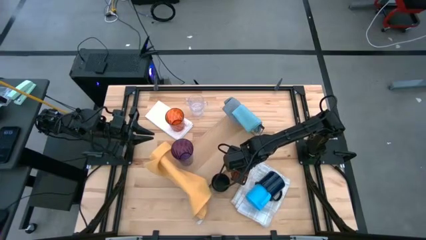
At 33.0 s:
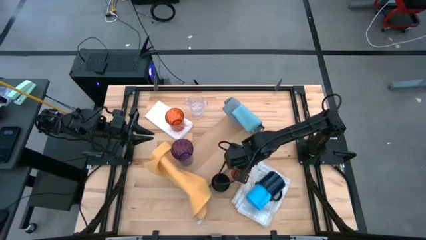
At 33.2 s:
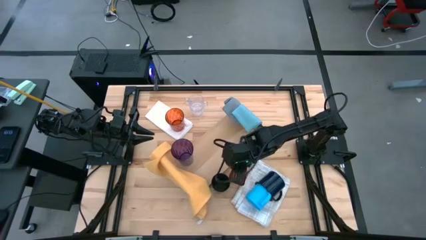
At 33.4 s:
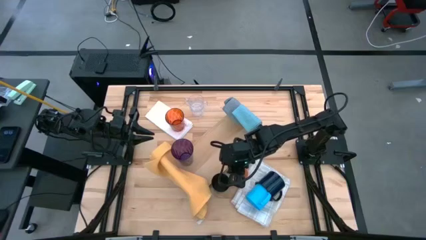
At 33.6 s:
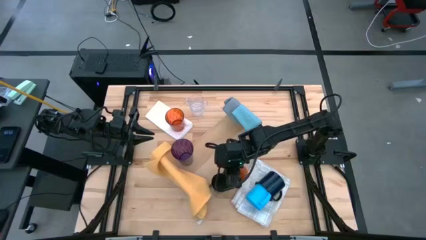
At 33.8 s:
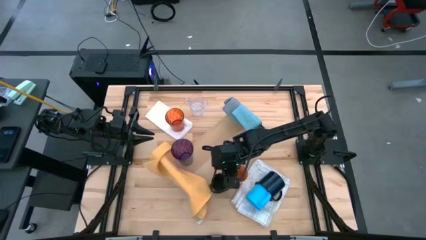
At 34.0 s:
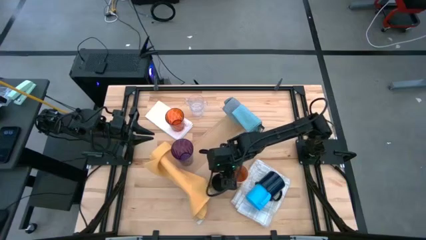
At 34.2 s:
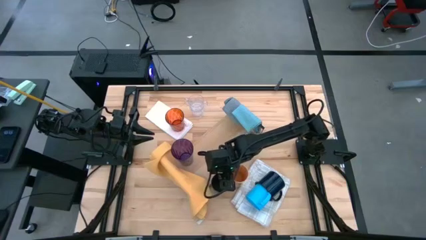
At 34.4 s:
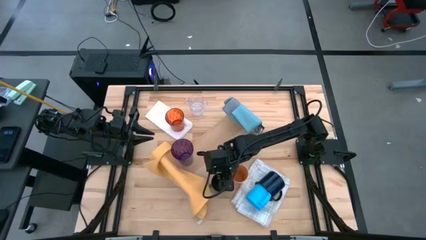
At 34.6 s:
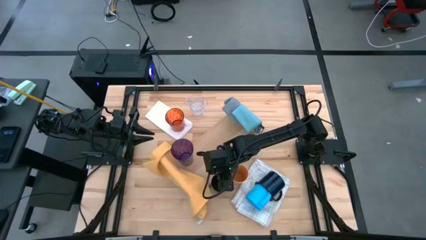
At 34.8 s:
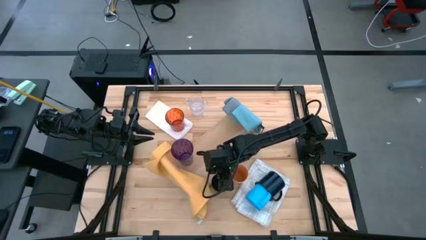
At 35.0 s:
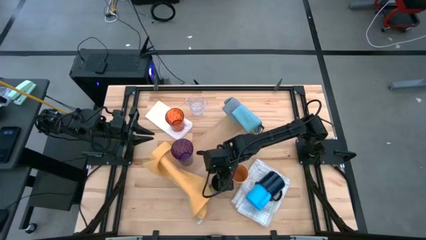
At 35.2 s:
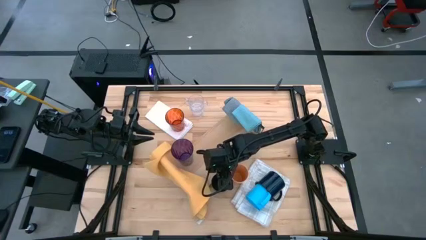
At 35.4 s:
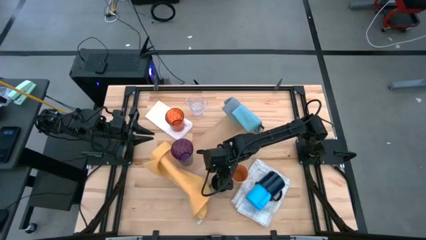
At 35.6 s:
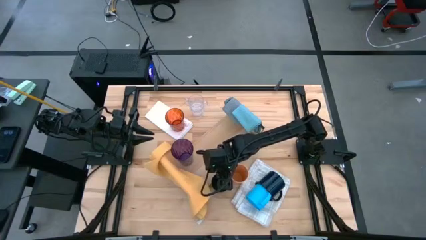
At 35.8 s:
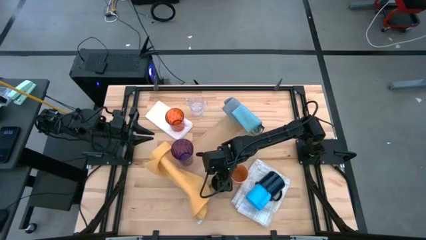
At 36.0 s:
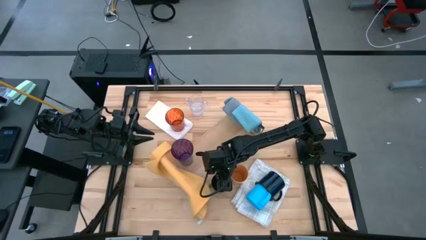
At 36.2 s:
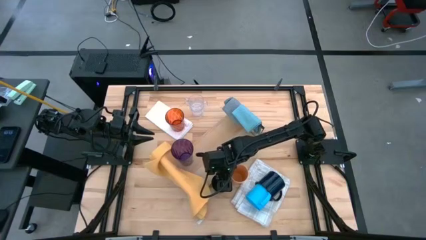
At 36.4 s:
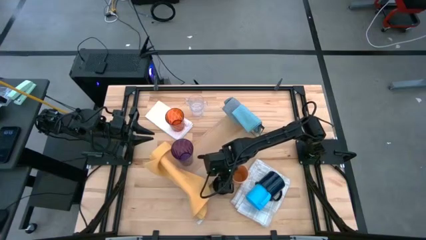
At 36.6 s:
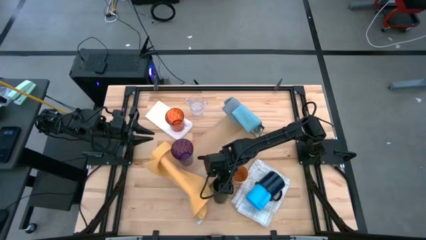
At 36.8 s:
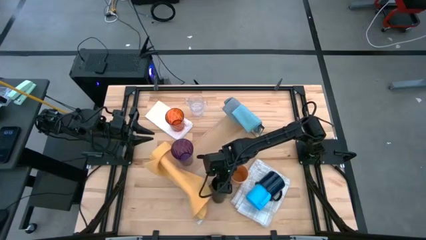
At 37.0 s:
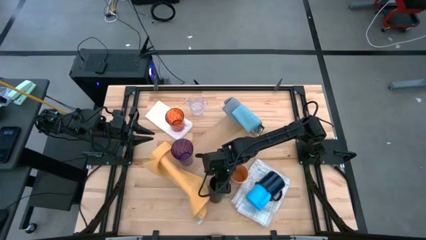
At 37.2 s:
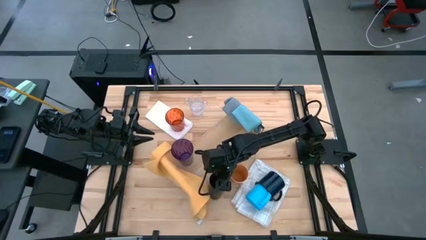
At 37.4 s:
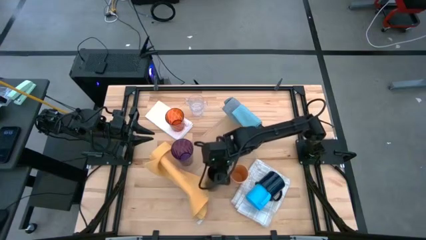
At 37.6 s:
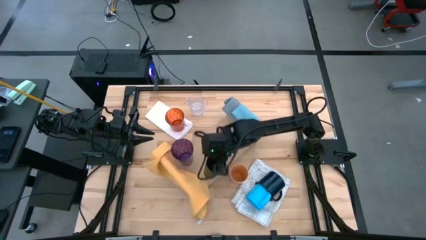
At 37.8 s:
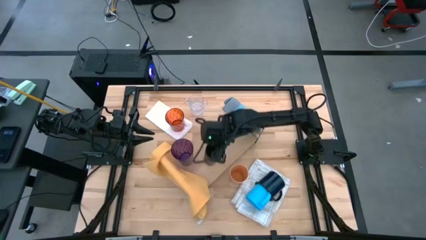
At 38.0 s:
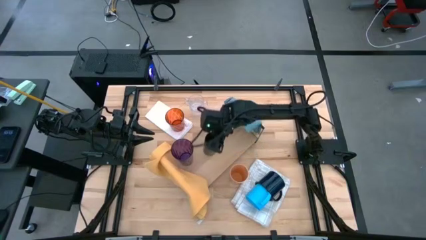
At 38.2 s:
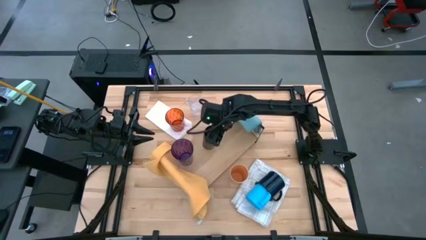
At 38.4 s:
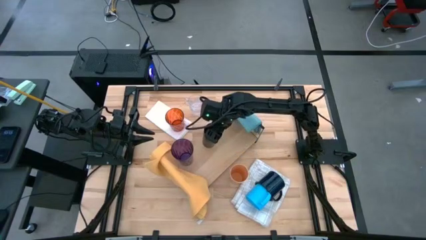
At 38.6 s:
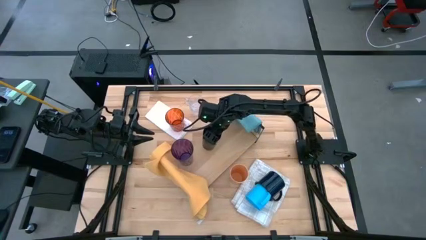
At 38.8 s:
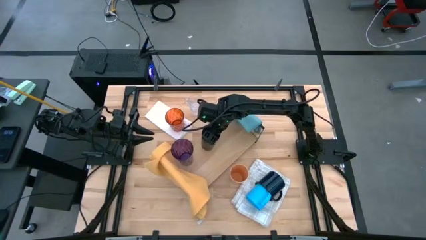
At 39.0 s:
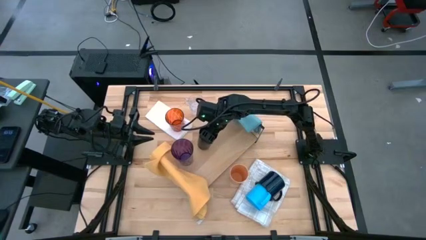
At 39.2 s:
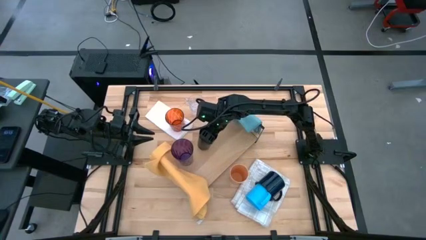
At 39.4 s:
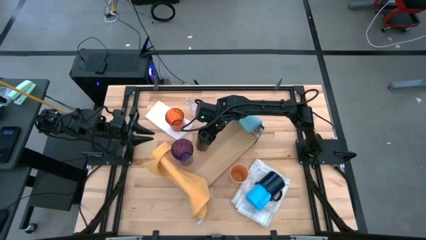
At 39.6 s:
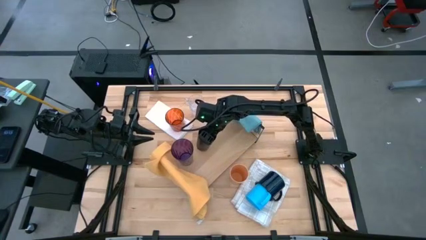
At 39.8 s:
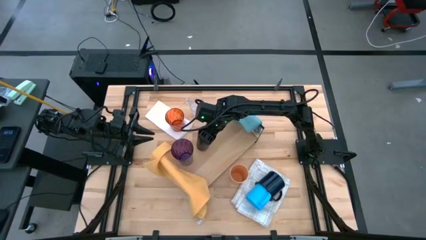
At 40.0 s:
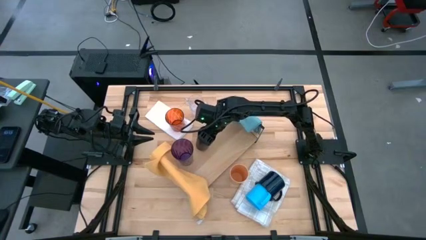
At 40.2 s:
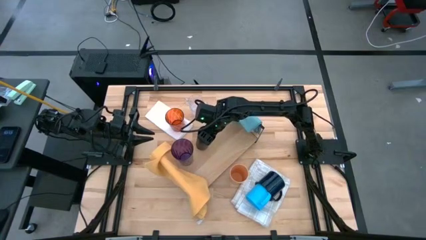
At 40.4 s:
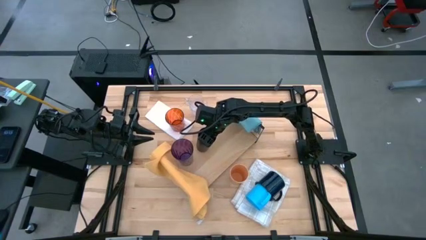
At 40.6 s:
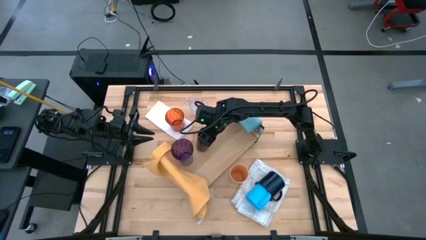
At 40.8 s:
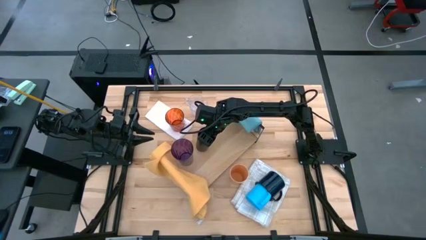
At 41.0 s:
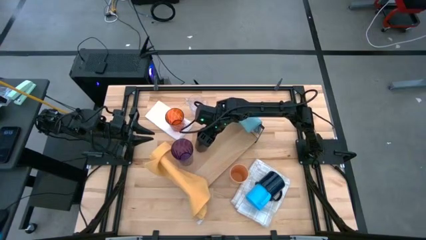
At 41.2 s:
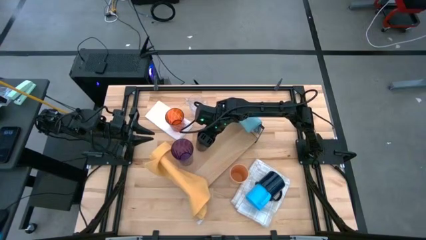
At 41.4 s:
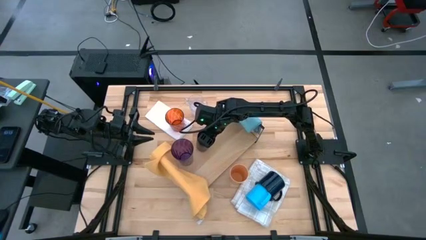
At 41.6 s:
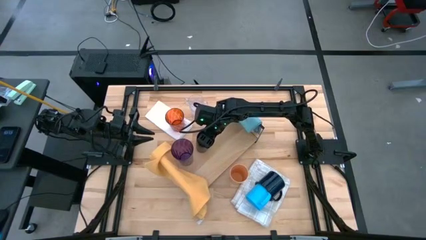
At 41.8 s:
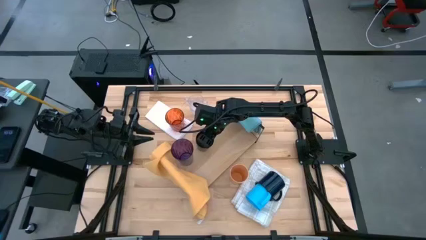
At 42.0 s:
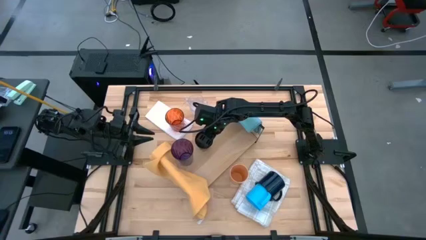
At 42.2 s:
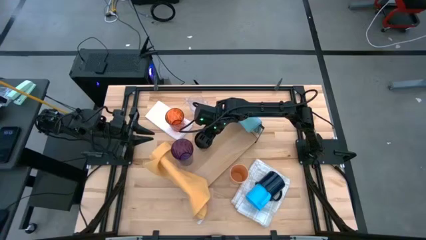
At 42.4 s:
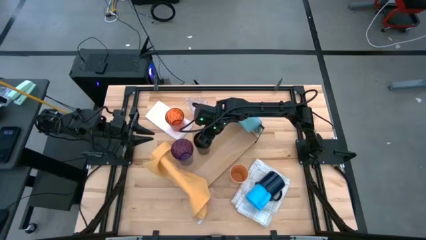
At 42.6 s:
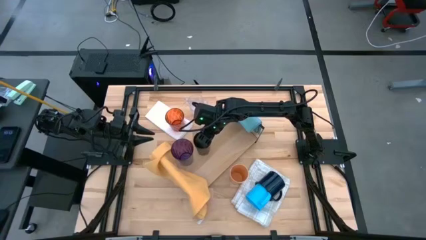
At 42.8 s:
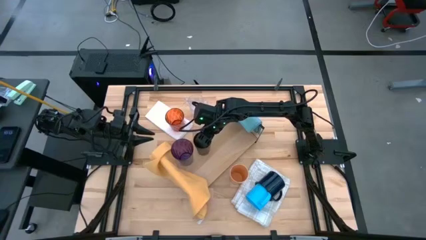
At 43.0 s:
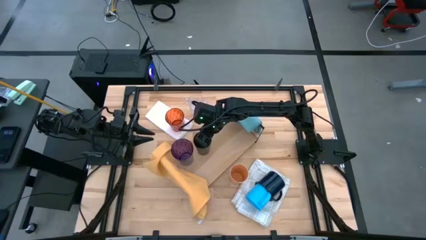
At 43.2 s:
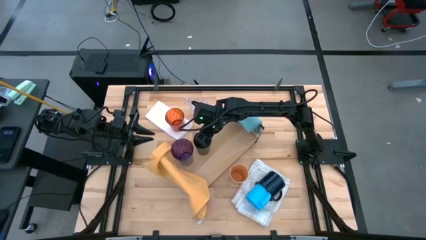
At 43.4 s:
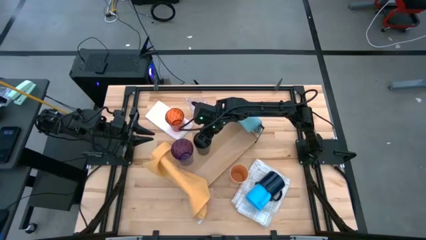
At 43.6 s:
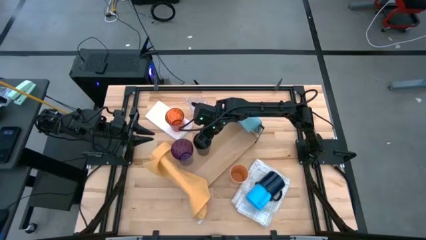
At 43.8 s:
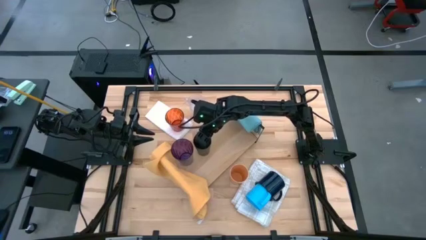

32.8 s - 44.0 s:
Task: Stack small to large cups/mugs on shelf
Put the black cup on the shelf
